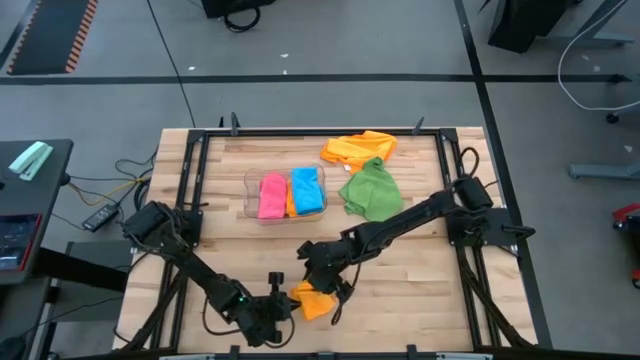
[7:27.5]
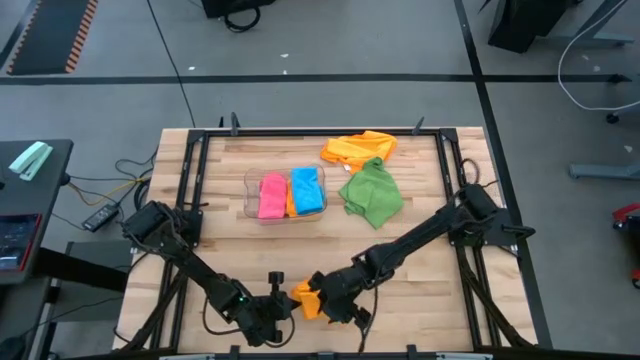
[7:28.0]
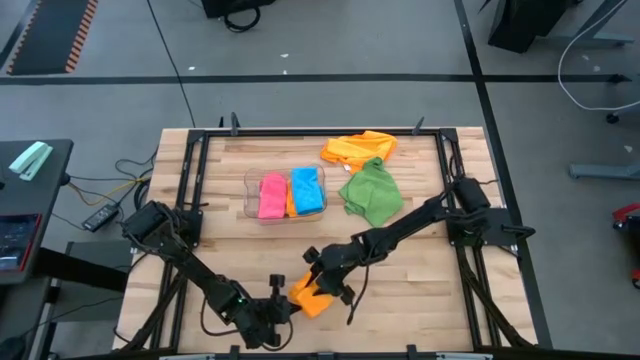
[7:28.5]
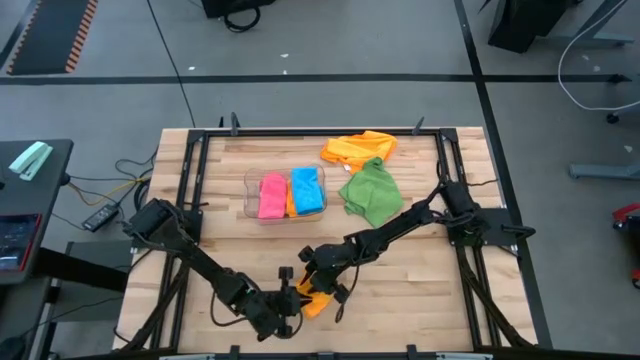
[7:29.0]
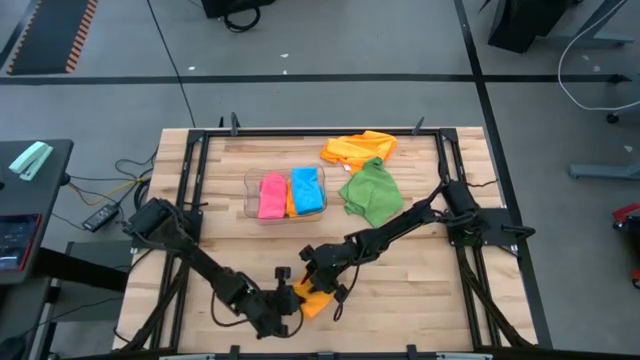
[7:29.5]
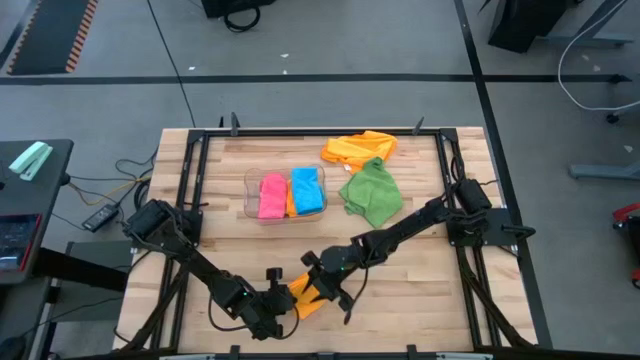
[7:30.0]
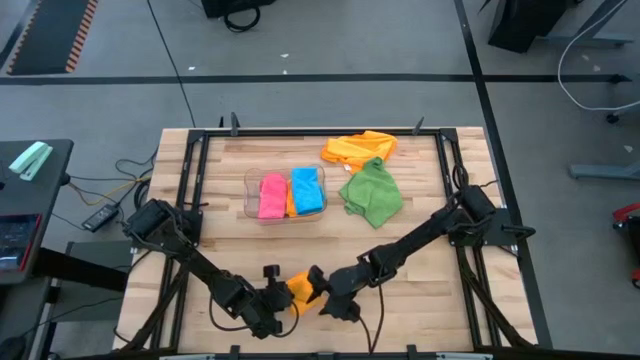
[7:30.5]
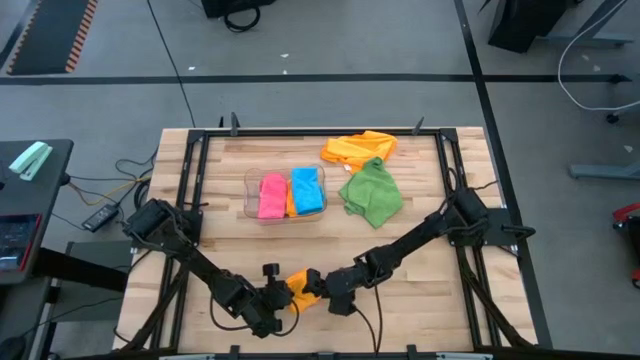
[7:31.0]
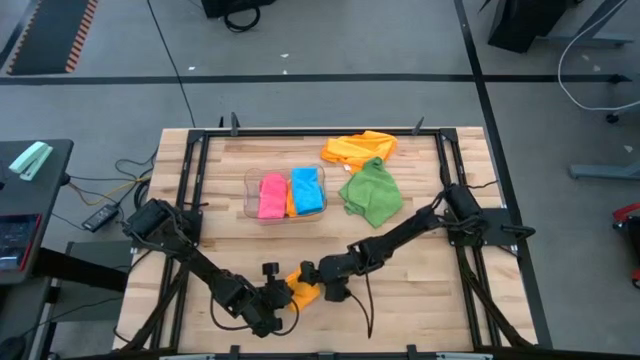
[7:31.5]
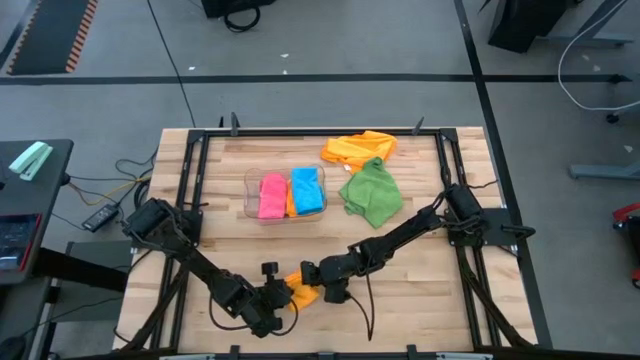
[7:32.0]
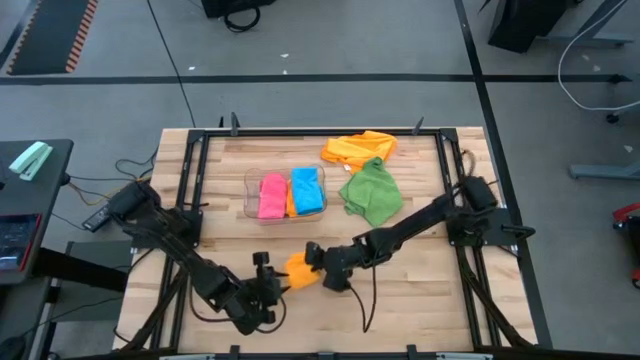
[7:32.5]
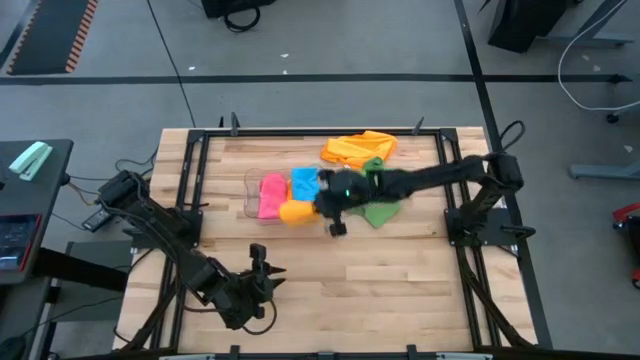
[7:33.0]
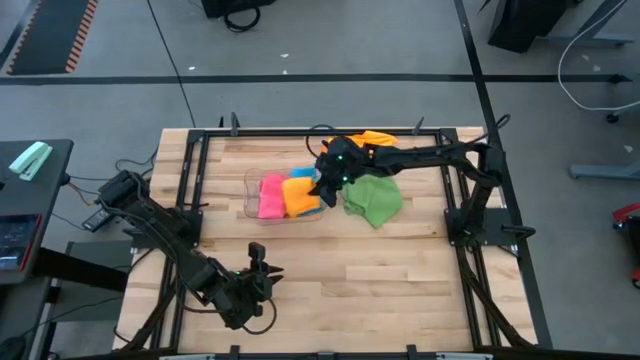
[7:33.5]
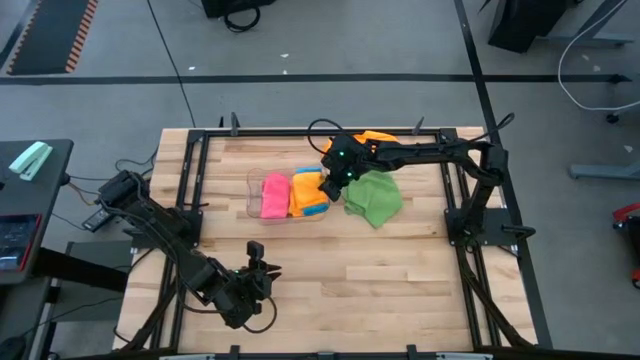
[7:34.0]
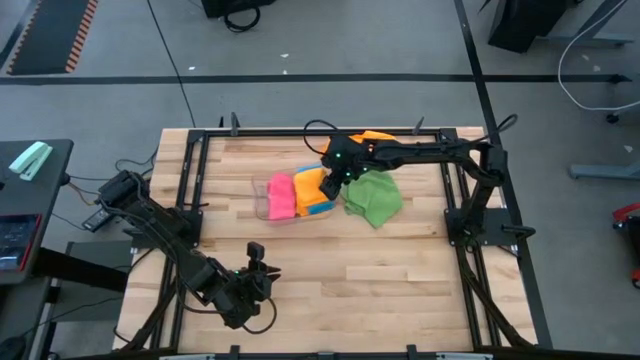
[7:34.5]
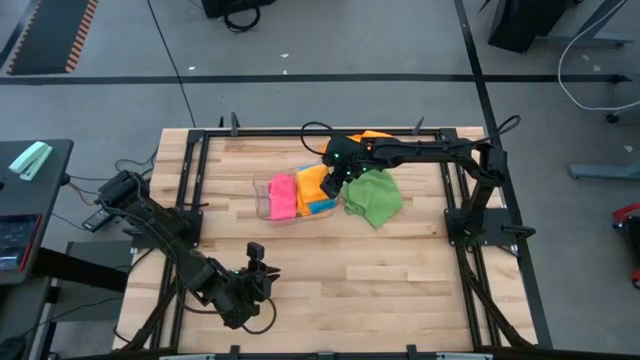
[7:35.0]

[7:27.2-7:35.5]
Task: Fold microfiber towels
Put the bottom folded orange microfiber cloth into the transparent bin
